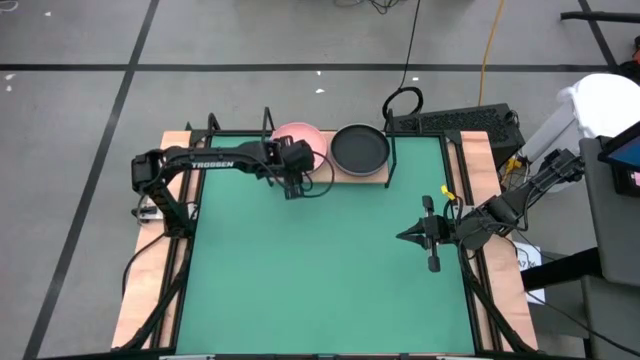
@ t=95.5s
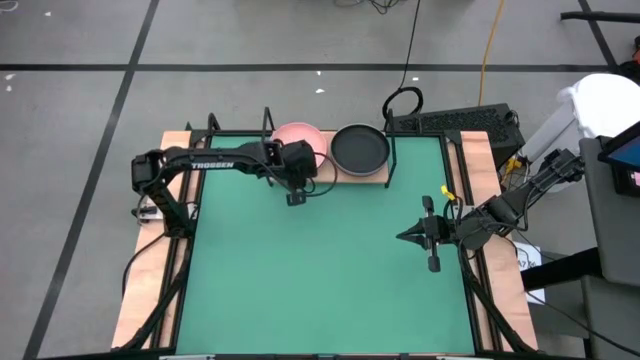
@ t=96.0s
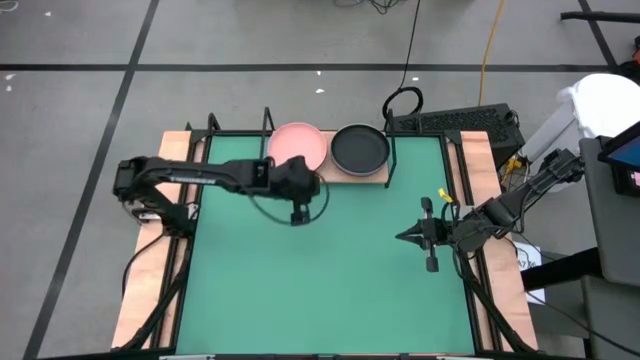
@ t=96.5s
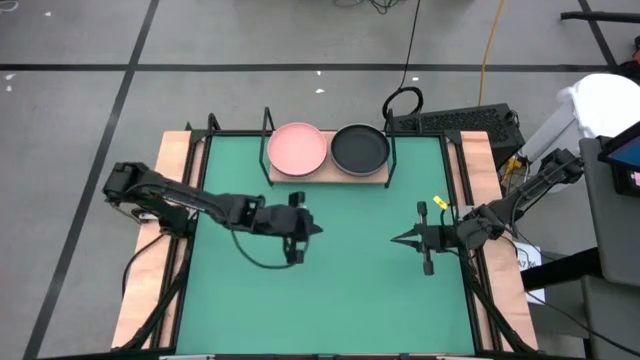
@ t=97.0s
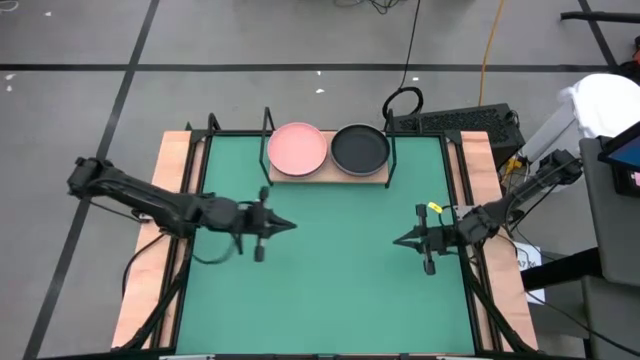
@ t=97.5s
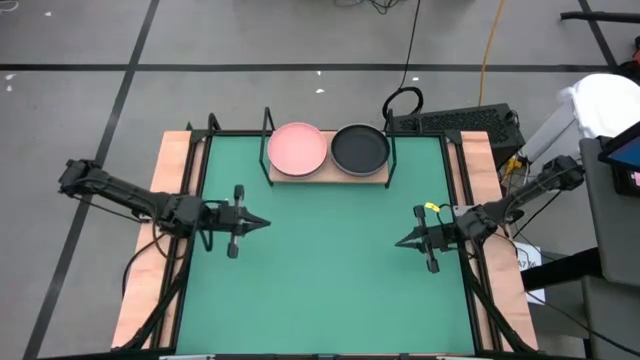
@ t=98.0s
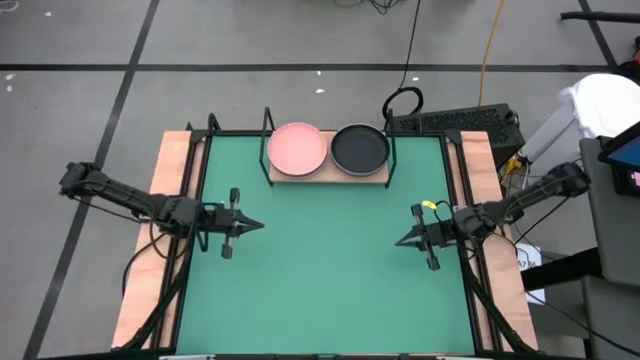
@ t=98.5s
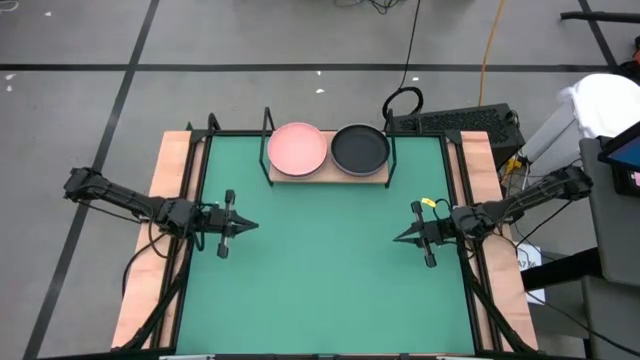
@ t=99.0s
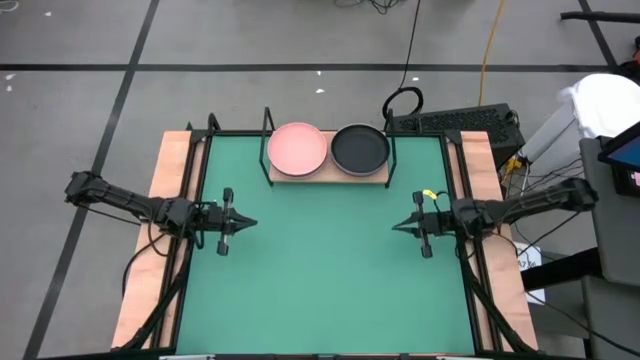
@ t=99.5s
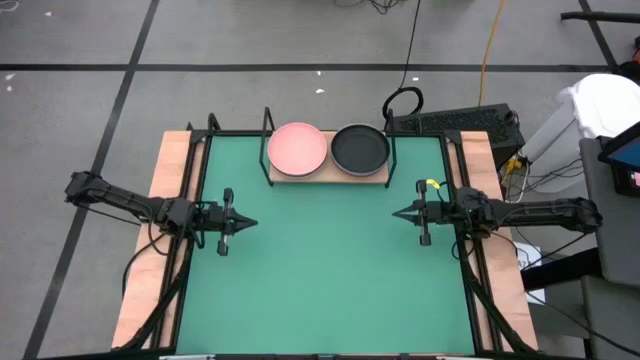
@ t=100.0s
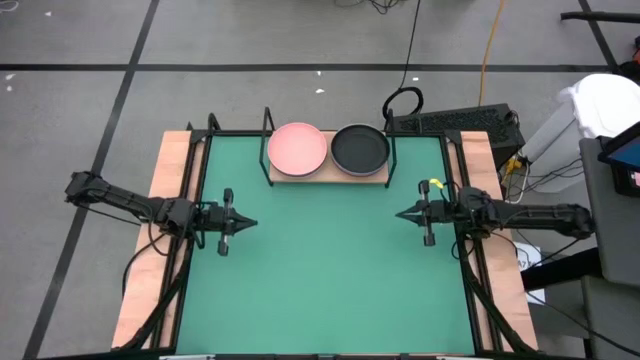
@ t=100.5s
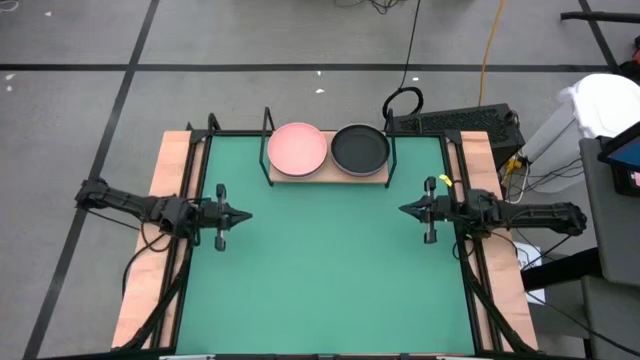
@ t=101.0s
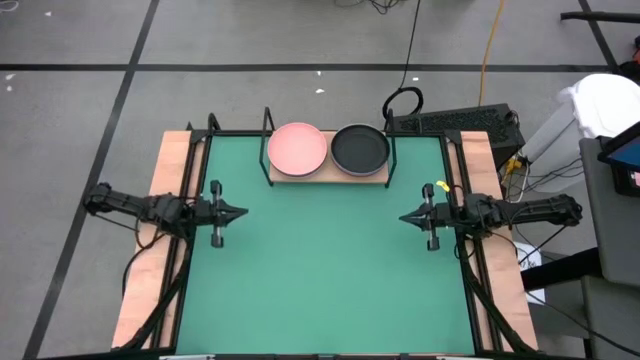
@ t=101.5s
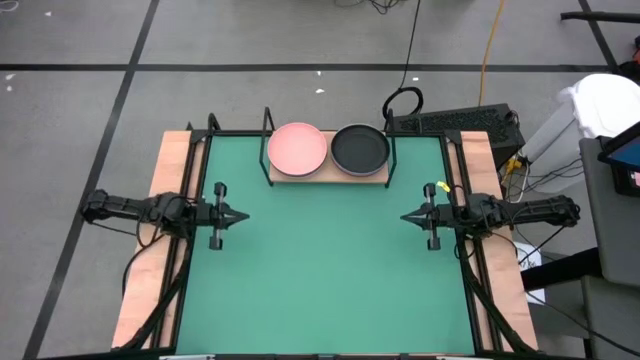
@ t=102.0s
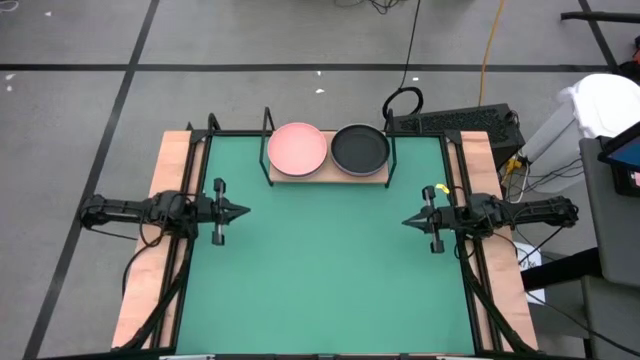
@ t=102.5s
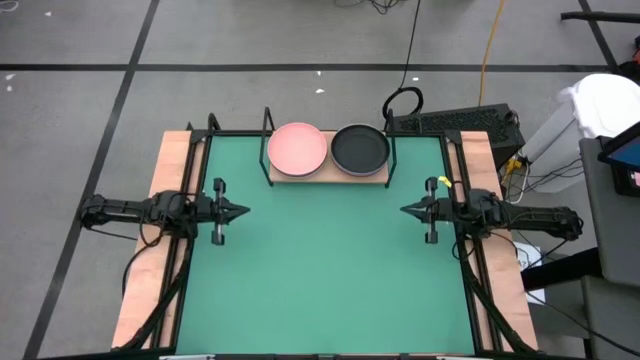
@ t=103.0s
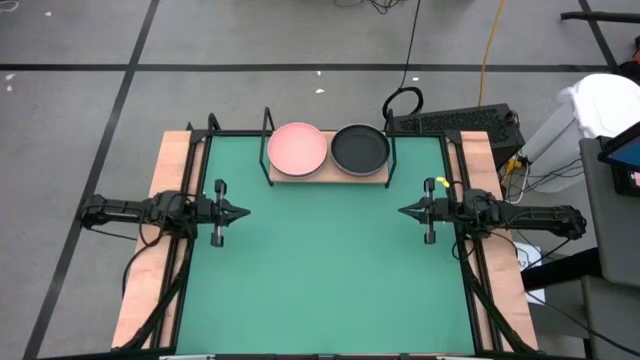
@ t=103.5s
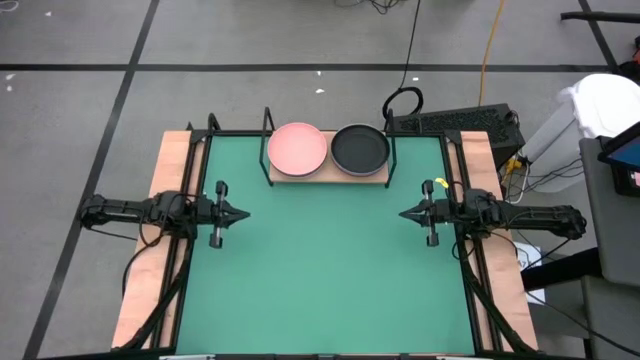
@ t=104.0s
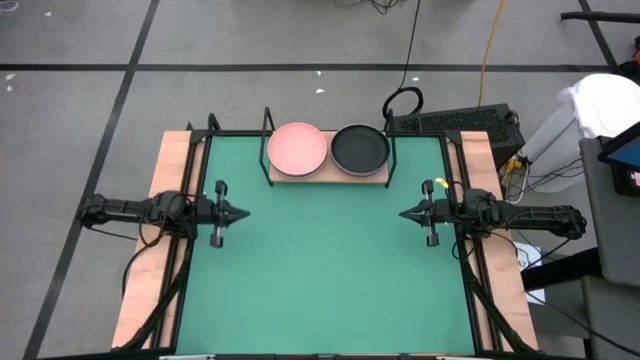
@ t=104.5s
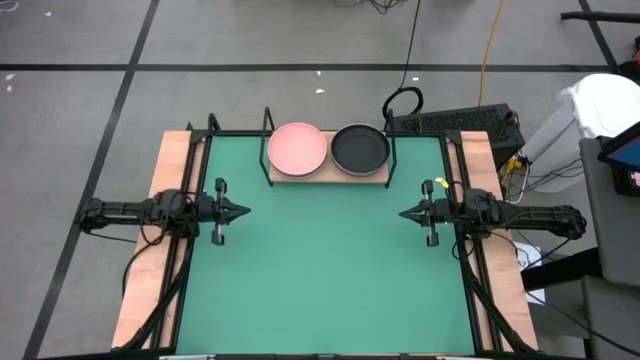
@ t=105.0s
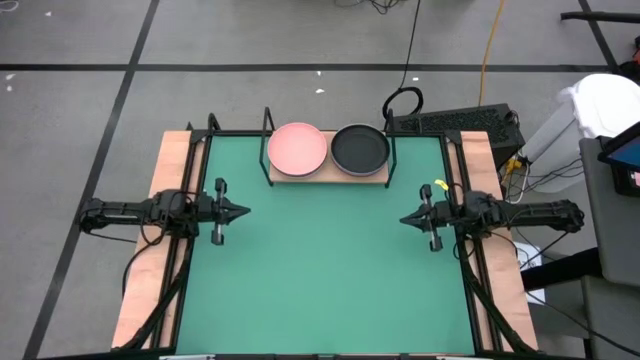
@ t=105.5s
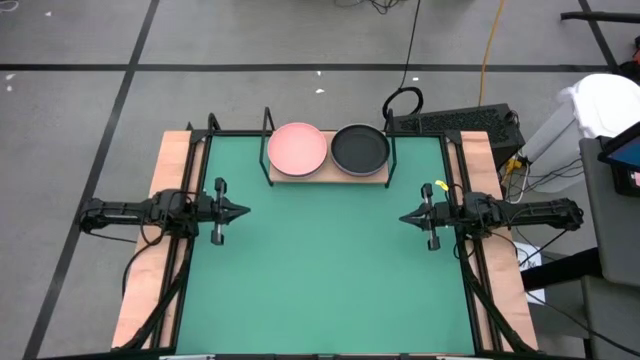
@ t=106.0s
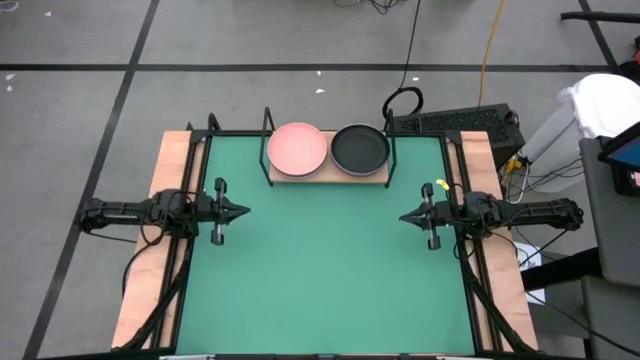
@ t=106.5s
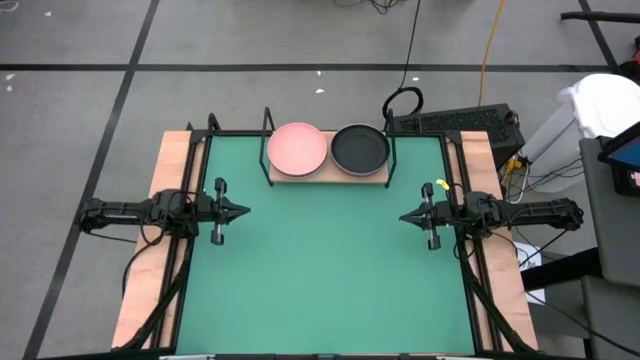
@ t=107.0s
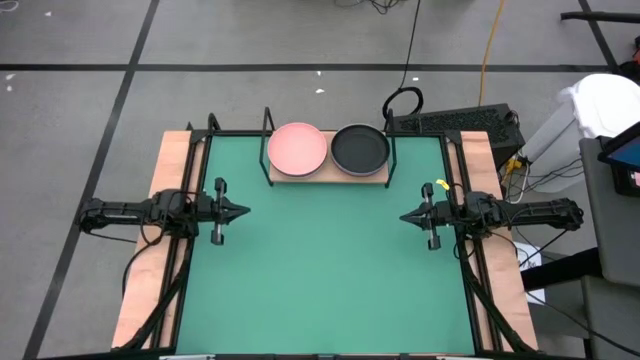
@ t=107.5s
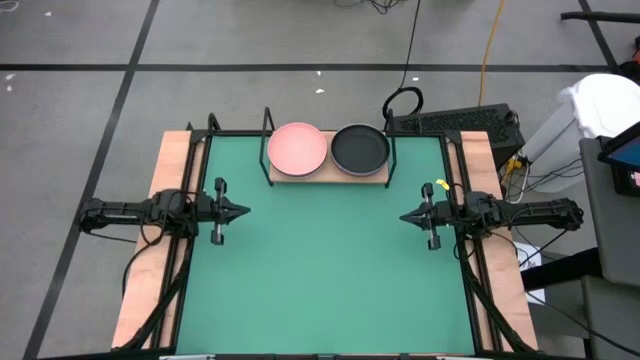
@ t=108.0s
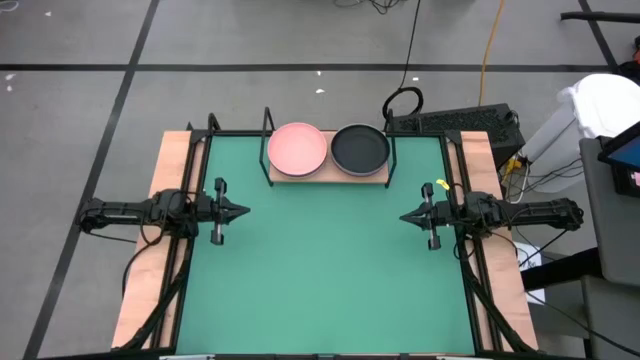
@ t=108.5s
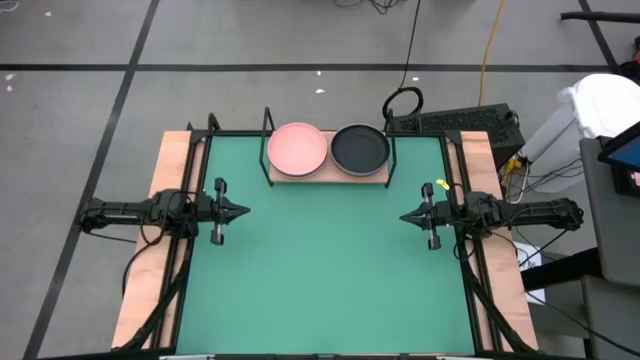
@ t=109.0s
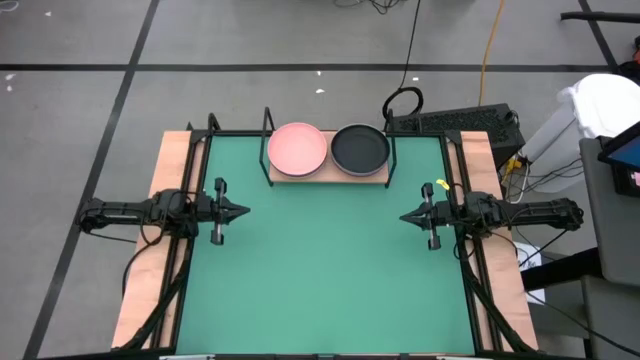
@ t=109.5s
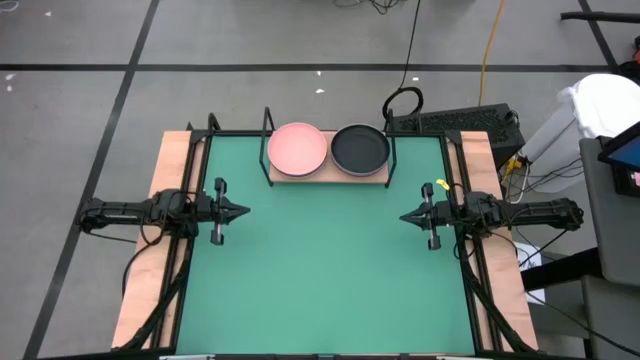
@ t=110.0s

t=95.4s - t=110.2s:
Task: Place and stack plates onto a shelf
Return to Home Position

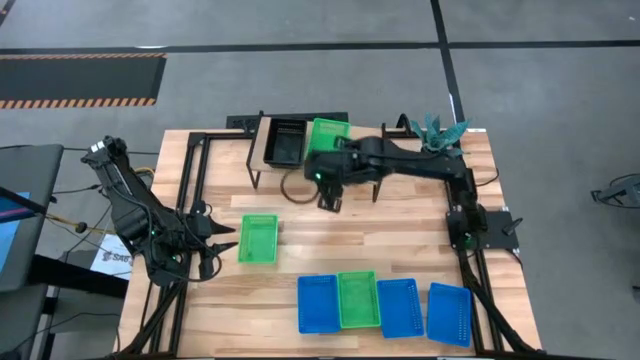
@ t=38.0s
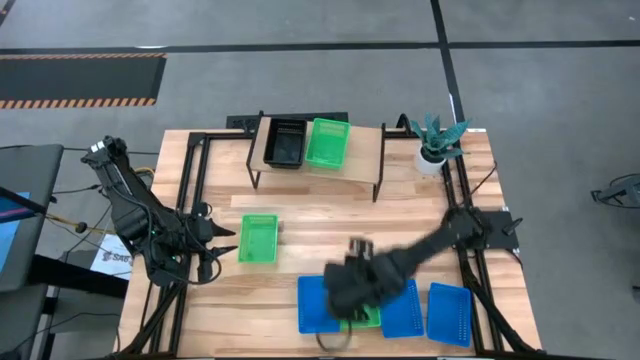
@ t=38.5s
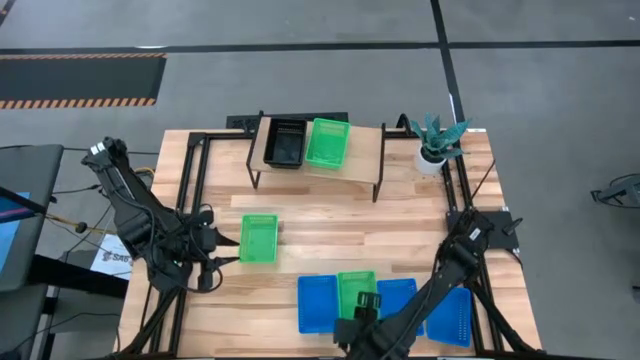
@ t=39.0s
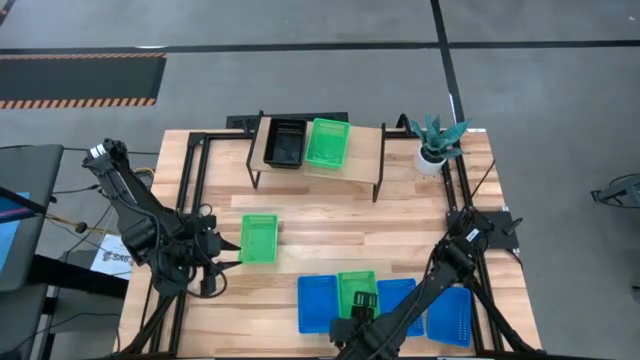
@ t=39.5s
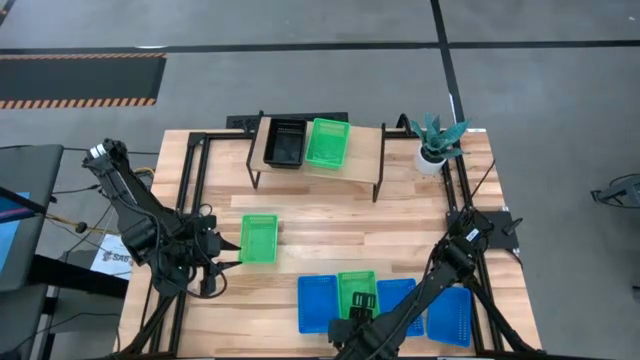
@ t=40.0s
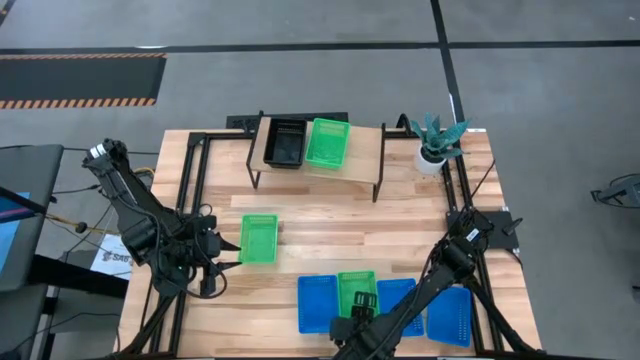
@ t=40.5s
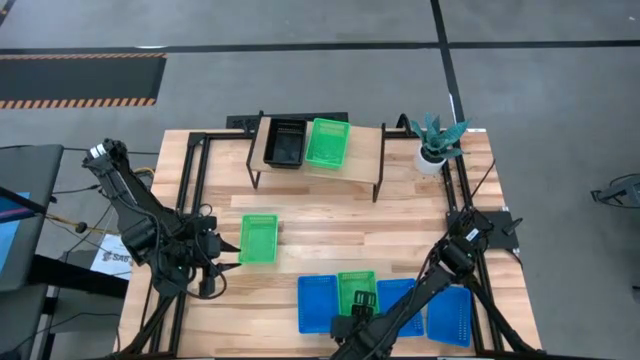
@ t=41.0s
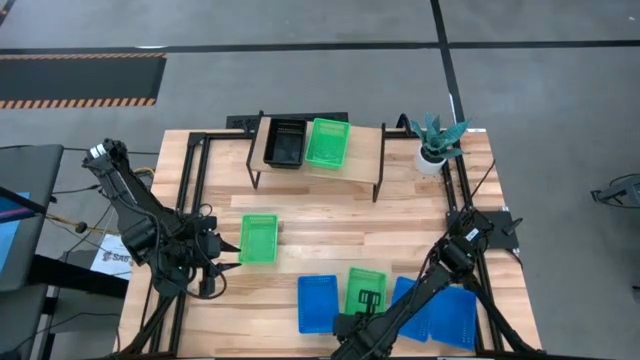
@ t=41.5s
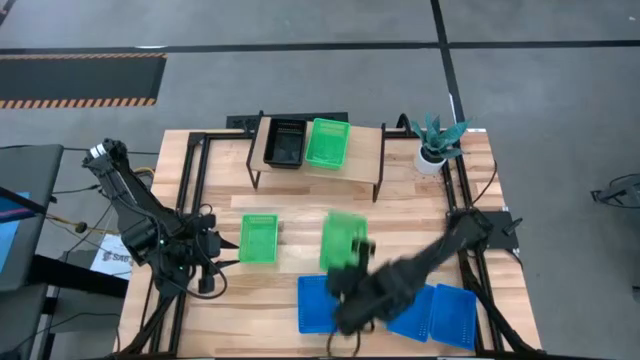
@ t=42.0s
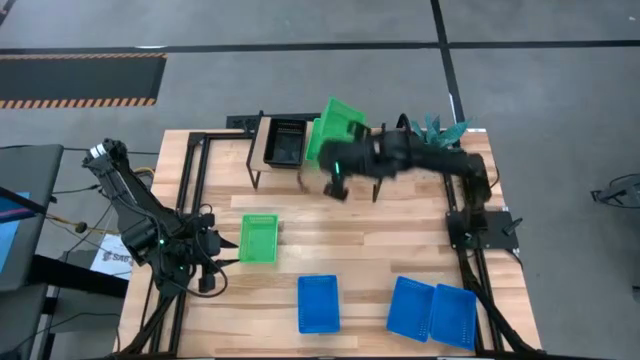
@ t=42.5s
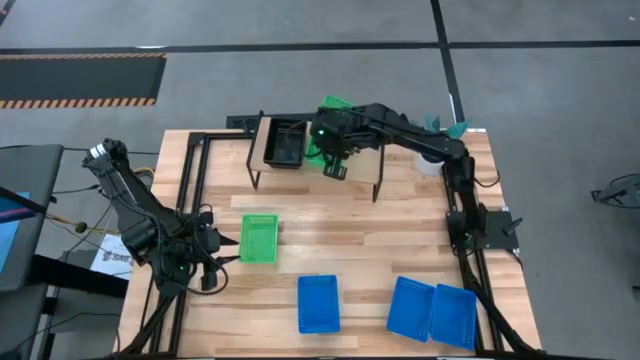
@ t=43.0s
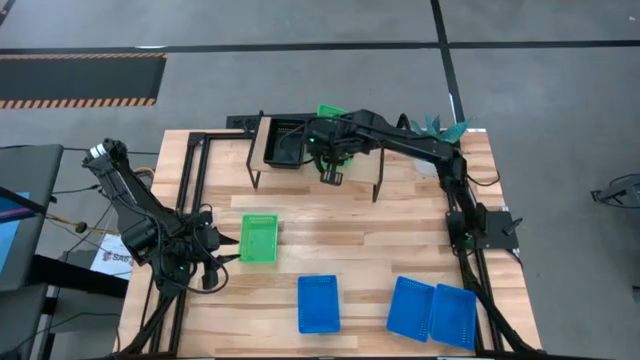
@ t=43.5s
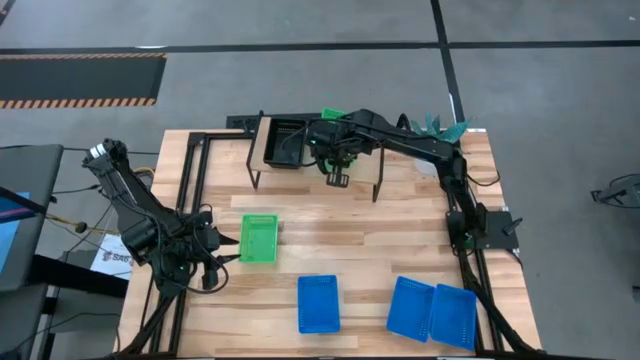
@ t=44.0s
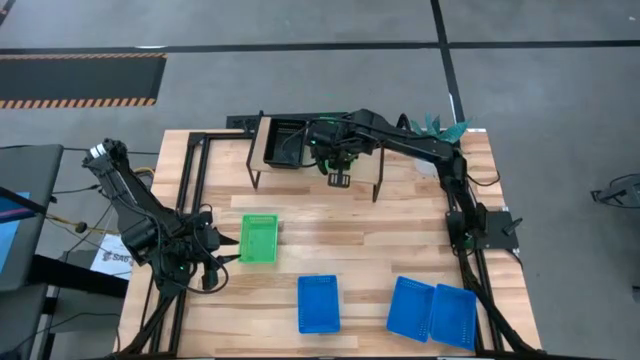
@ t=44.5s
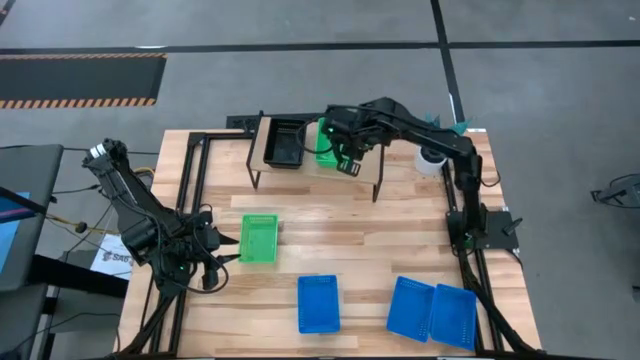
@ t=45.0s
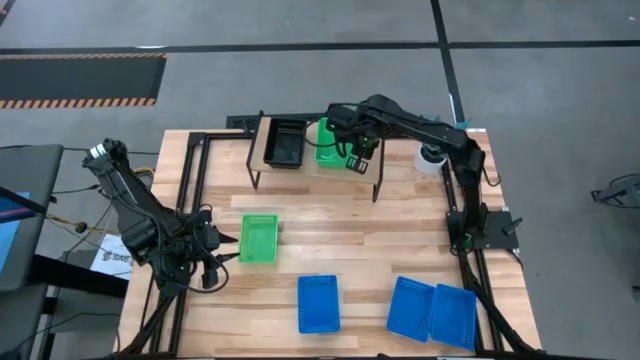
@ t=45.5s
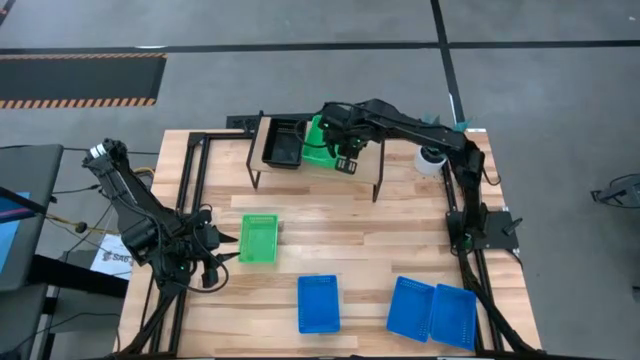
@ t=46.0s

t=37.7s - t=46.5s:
Task: Stack baskets on shelf by color
Stack the bottom green bin on the green bin on the shelf
